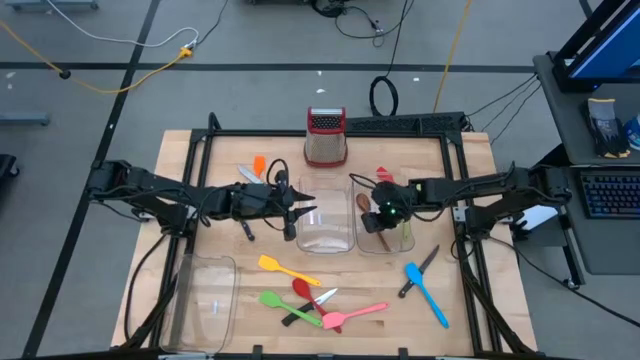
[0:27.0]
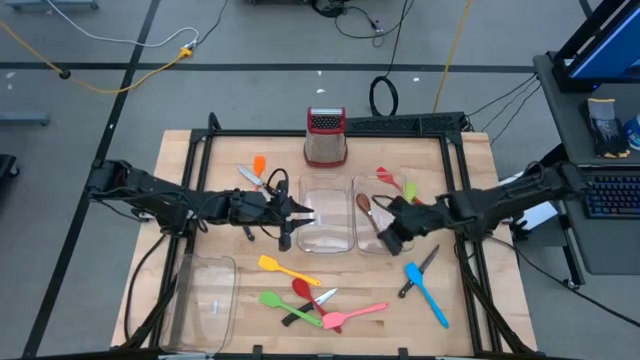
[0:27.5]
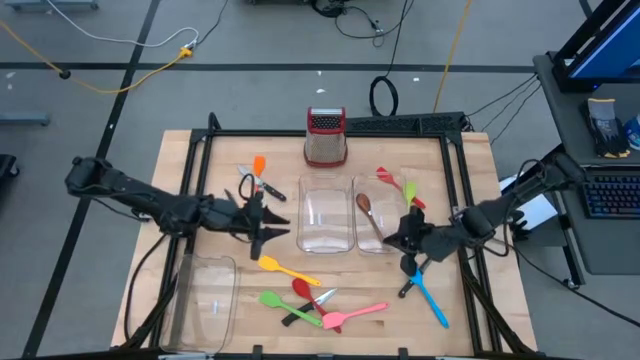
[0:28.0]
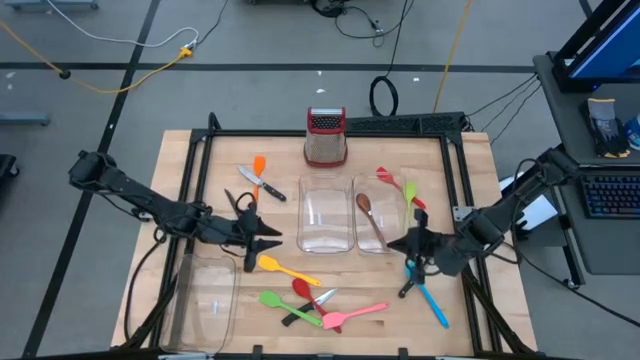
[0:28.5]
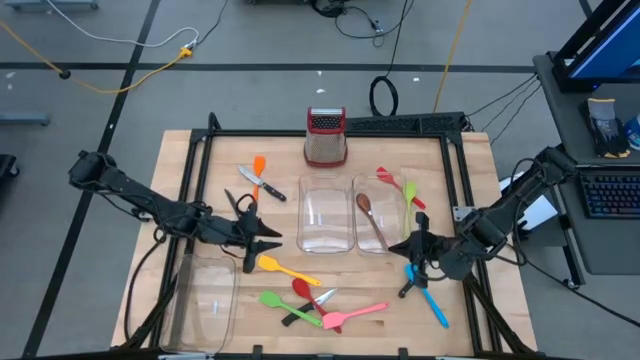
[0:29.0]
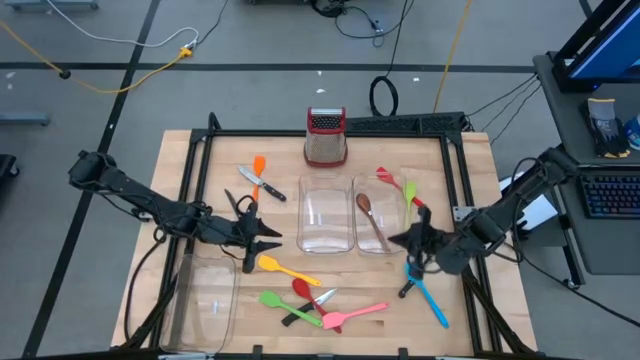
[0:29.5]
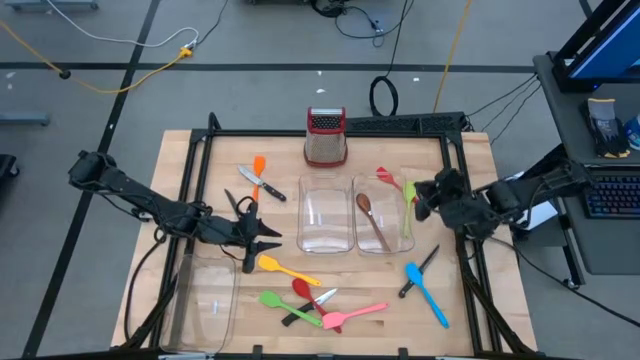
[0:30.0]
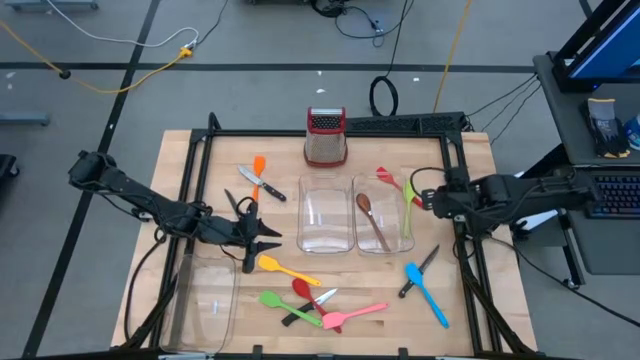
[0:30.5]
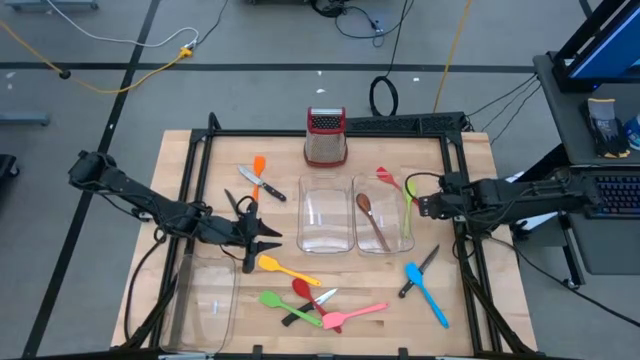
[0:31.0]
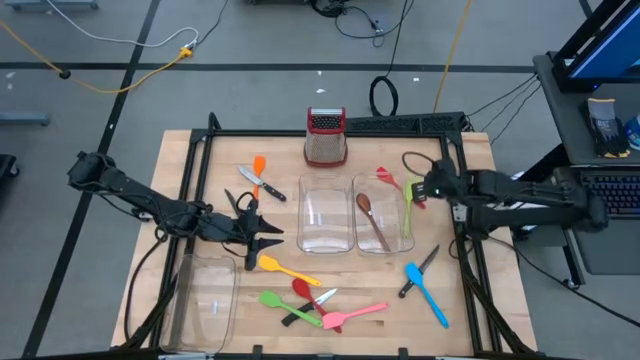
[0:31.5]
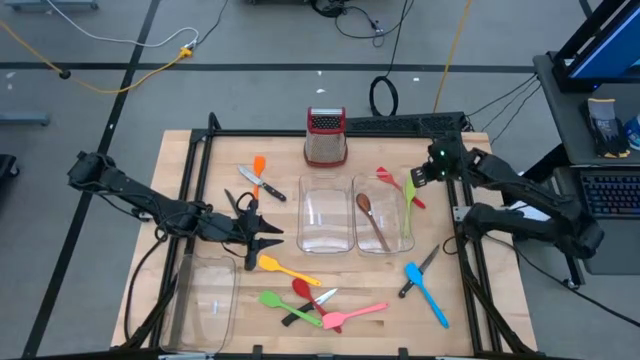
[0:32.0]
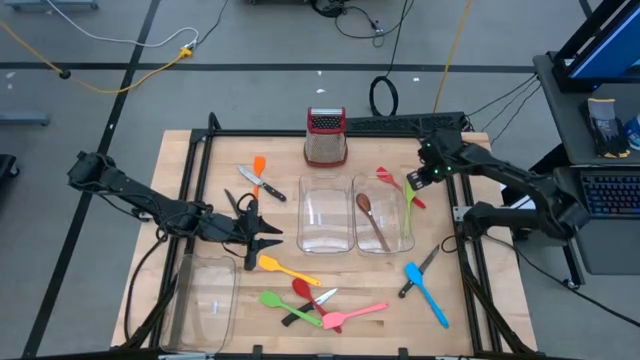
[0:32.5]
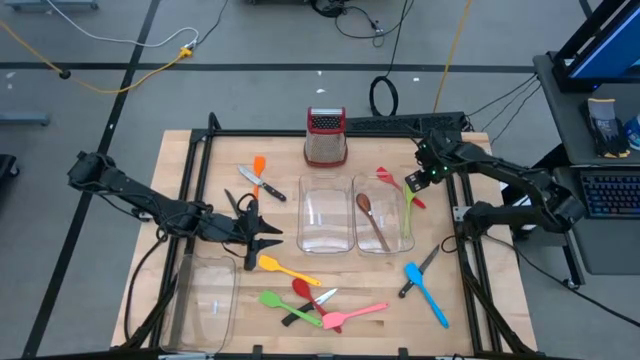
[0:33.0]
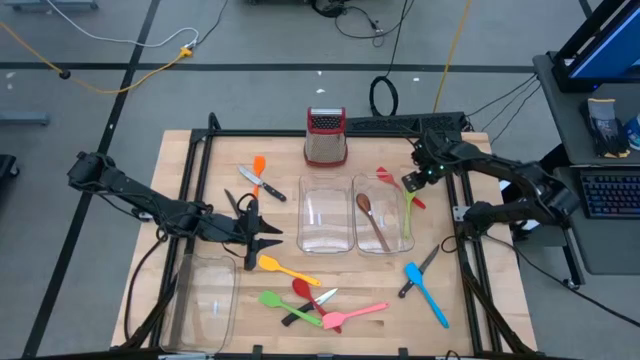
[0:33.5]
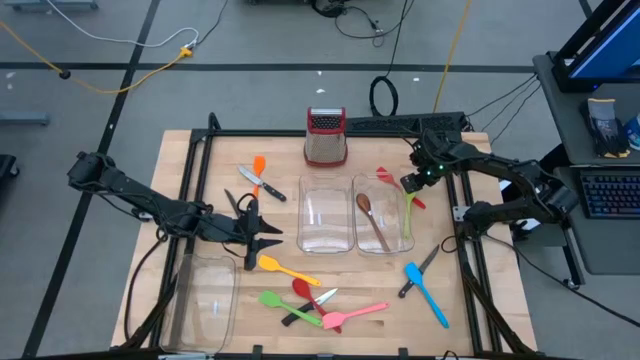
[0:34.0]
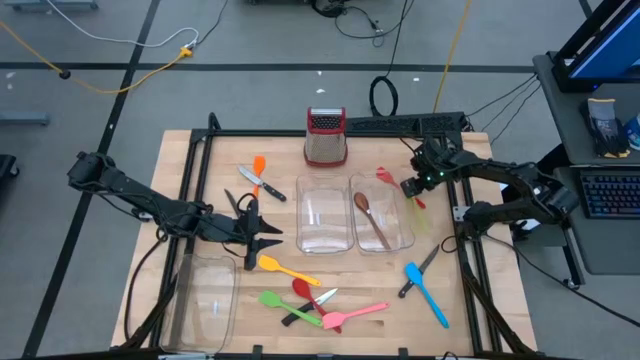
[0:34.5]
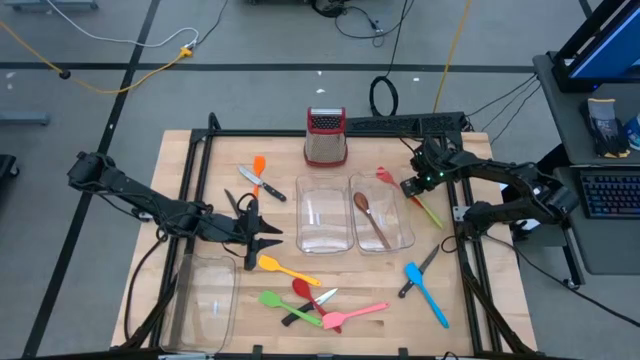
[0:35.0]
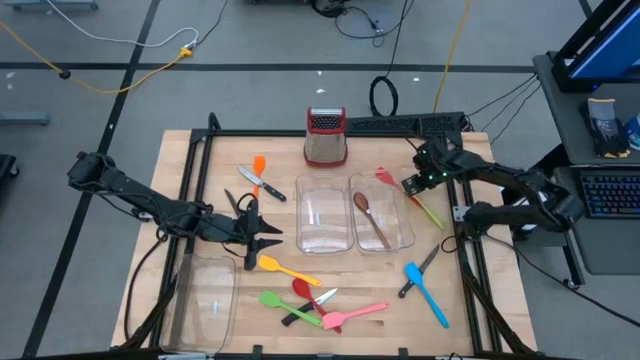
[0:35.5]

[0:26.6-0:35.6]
Task: Pick & Place Kitchen Items
Put the green serving spoon into the right transparent bin

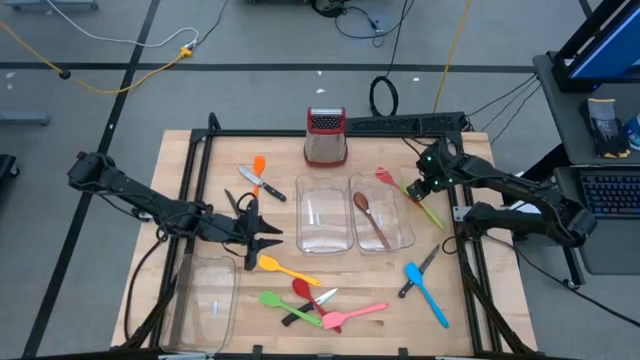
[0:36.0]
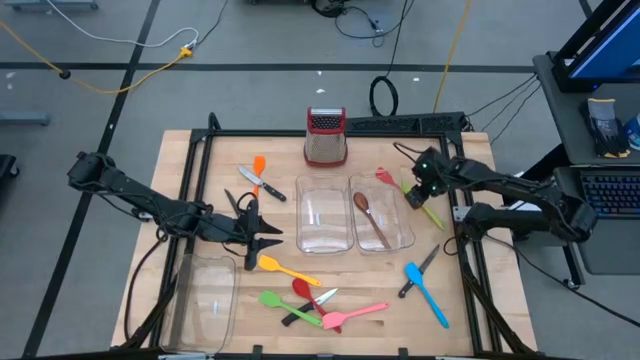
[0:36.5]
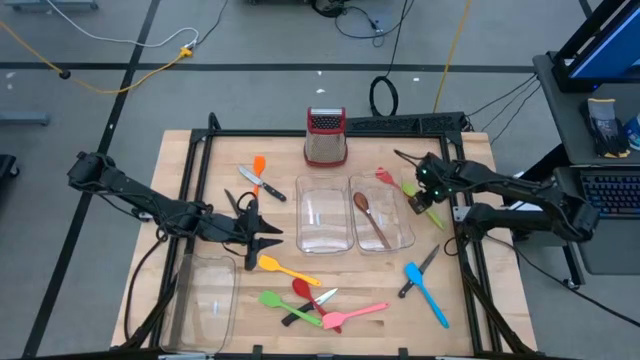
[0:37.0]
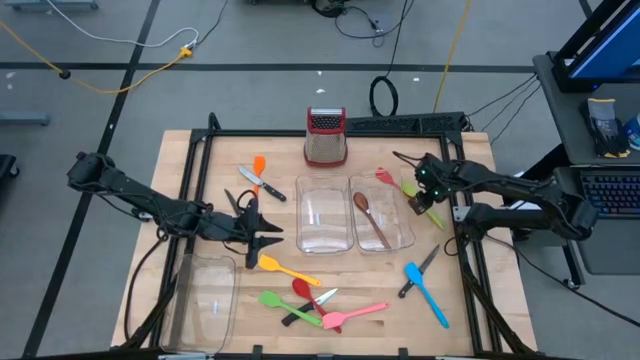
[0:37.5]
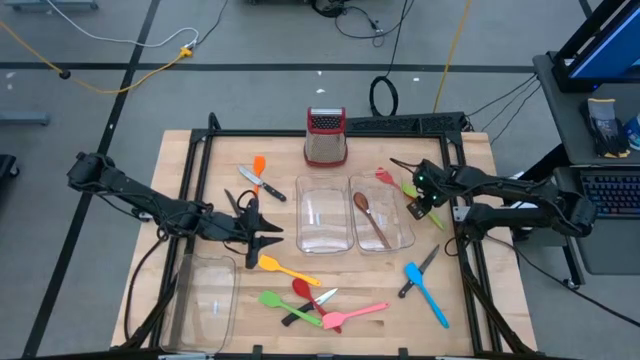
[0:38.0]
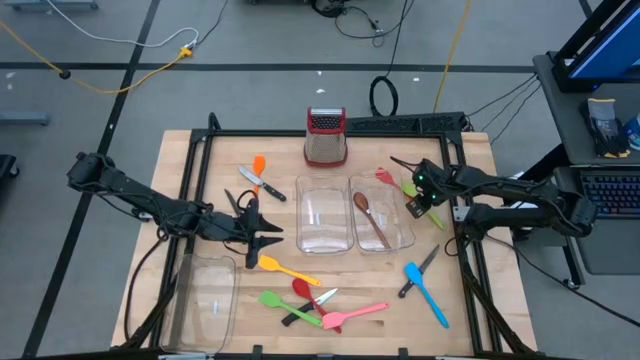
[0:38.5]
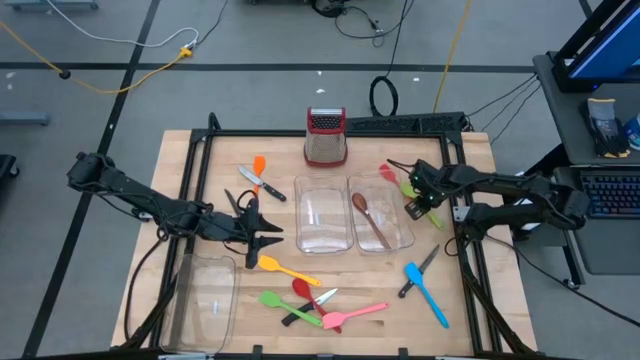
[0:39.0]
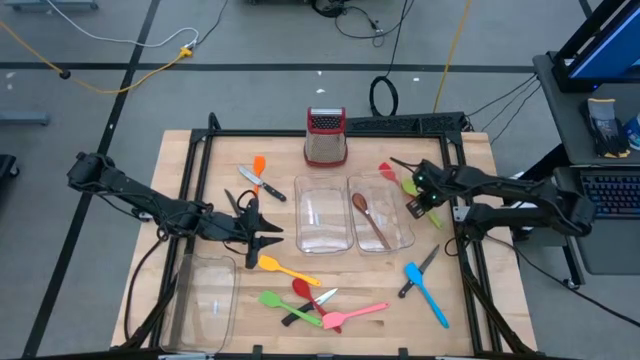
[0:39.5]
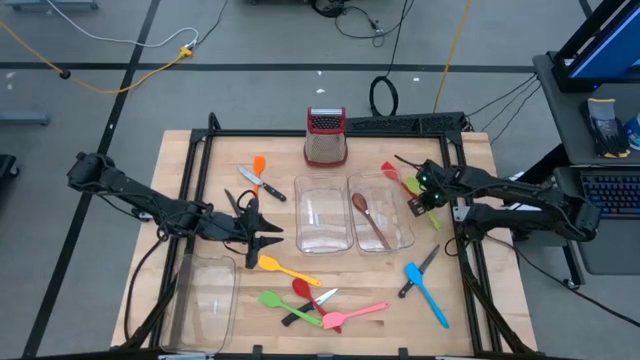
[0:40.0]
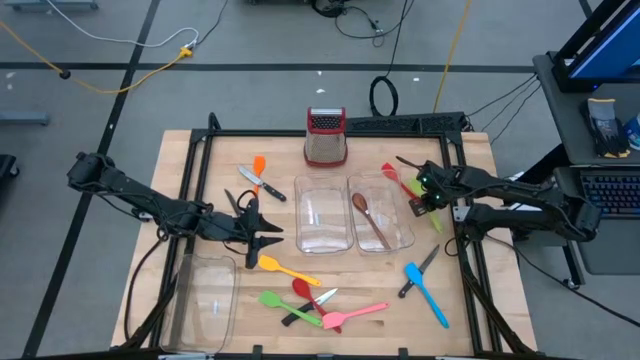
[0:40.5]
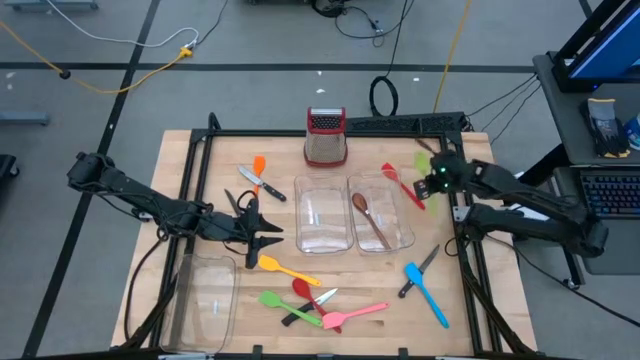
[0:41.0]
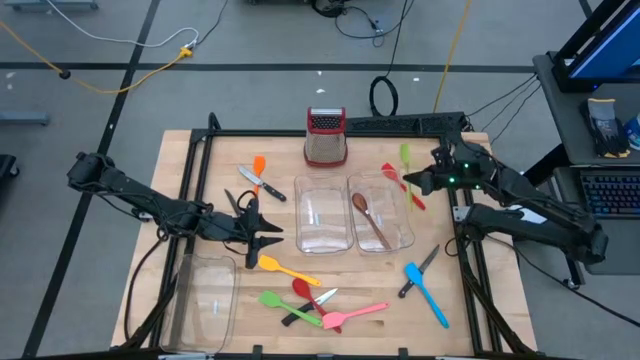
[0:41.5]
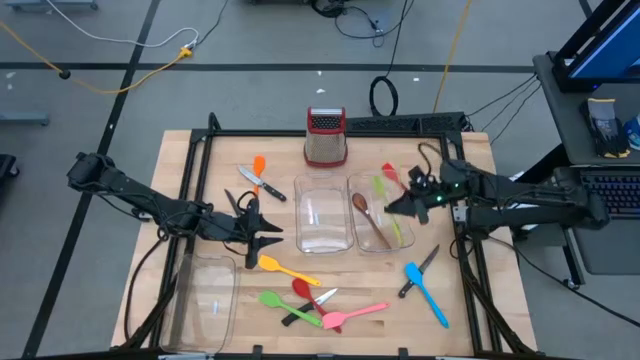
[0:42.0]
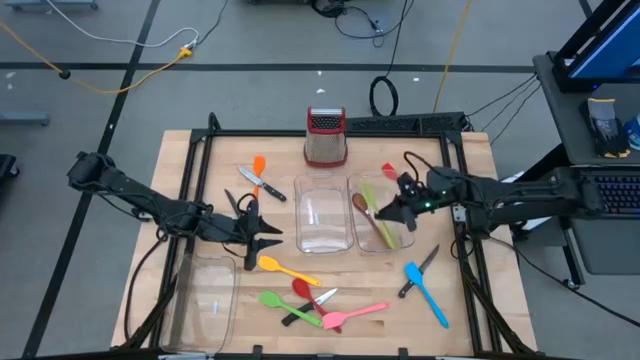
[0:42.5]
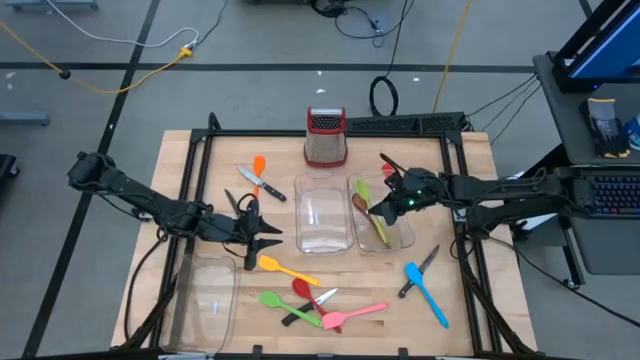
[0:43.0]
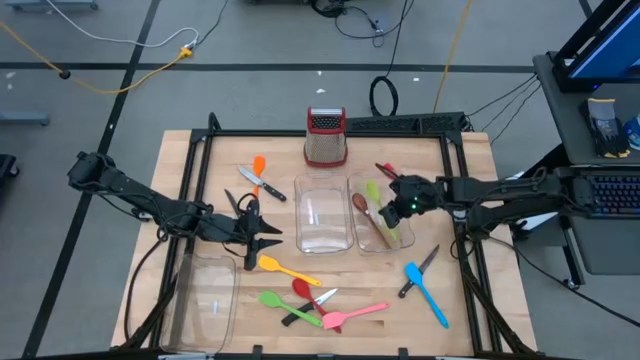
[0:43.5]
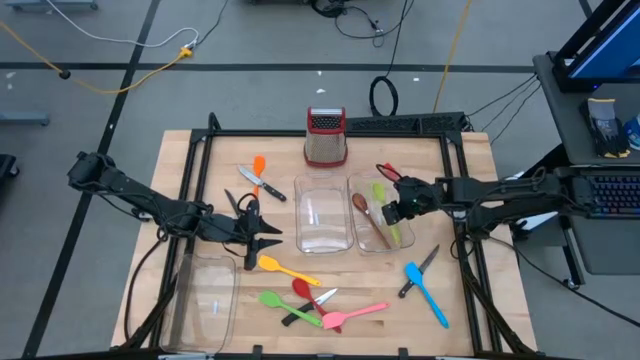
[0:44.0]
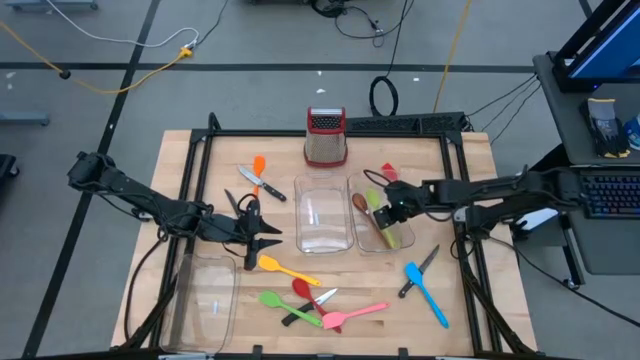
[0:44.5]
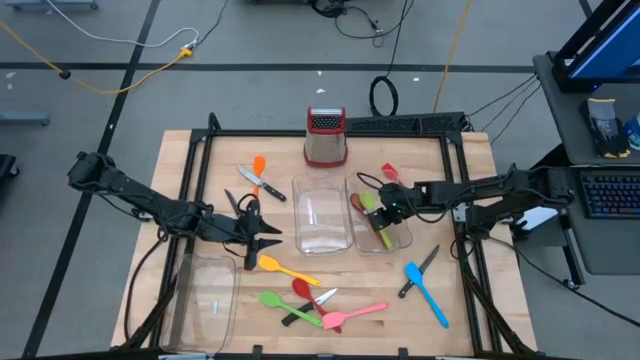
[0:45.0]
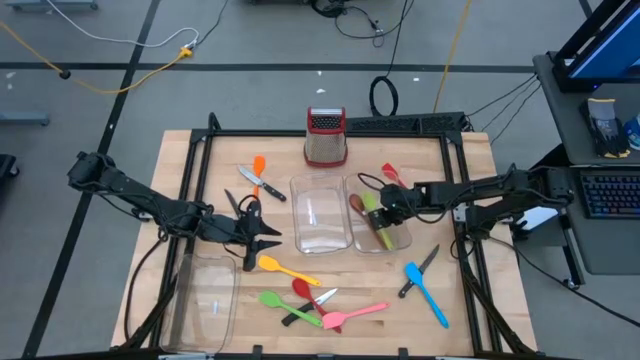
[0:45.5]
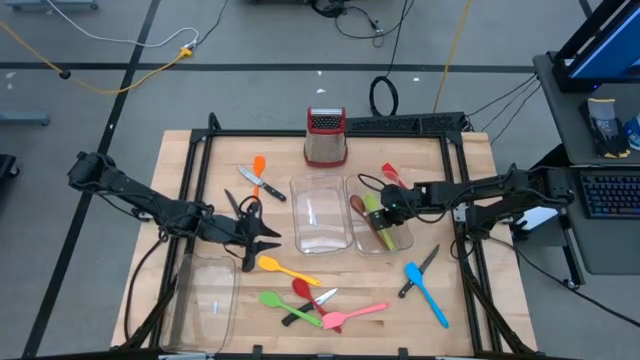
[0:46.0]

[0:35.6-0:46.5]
Put the green serving spoon into the right transparent bin

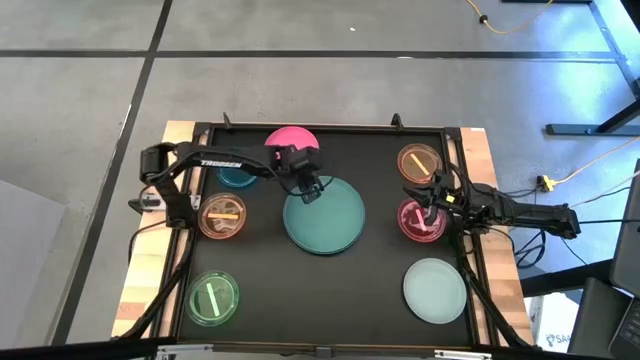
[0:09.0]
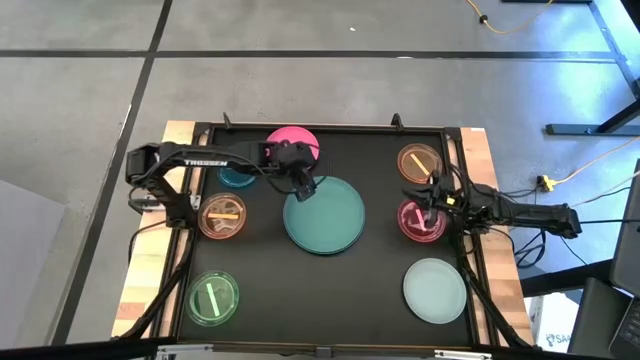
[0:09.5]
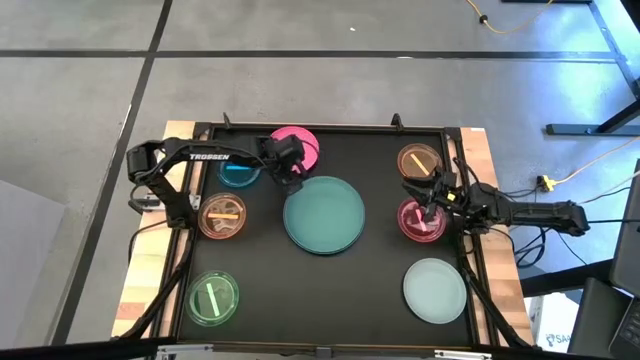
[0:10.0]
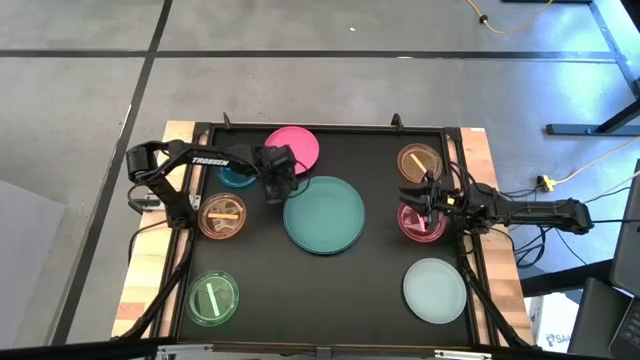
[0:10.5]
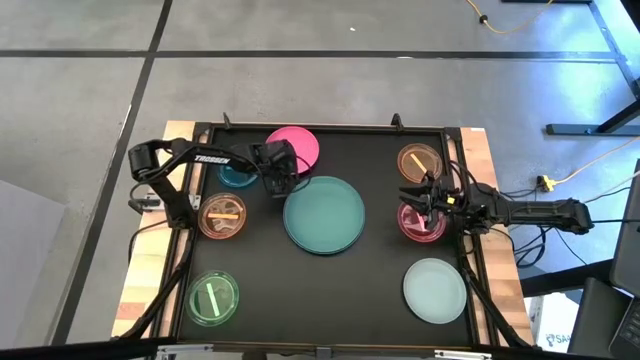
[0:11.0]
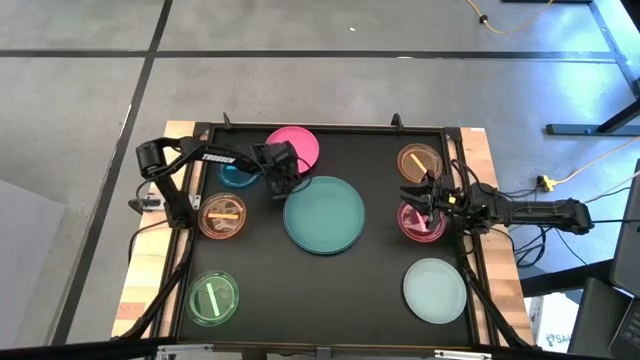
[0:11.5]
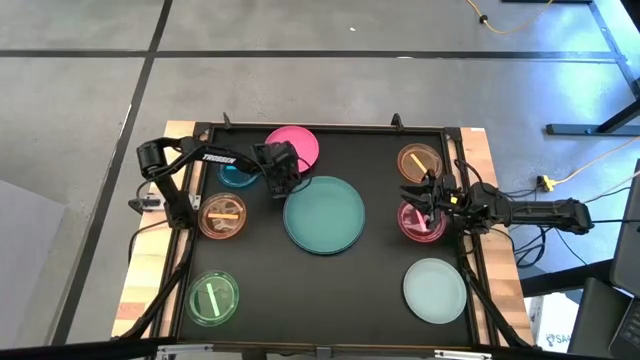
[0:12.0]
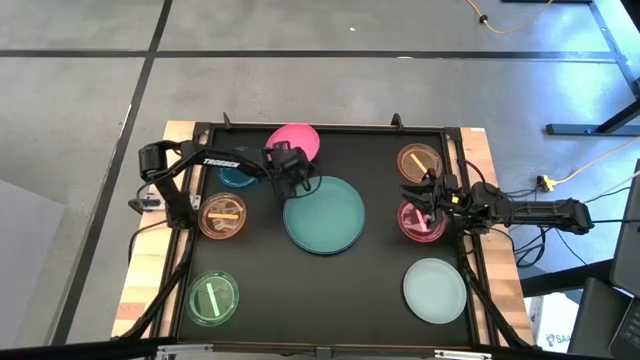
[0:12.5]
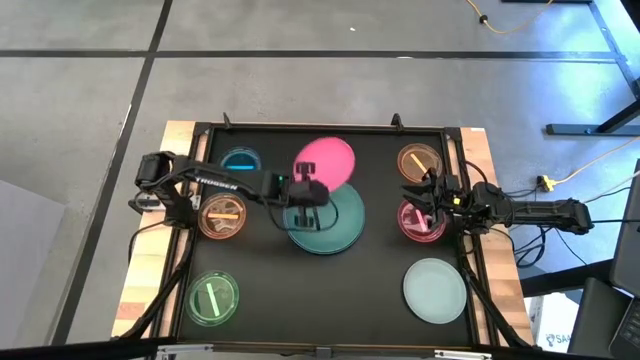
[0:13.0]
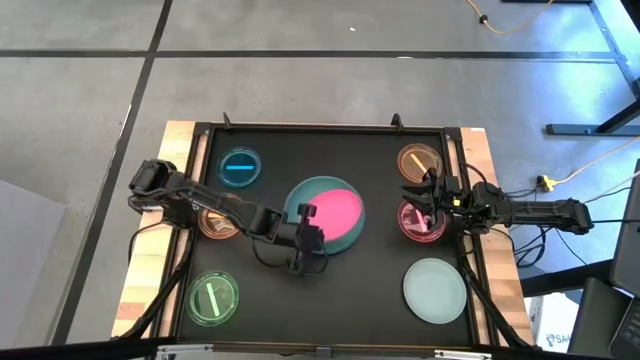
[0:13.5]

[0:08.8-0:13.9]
Task: Stack plastic plates
Stack the large pink plate on top of the stacked plates
